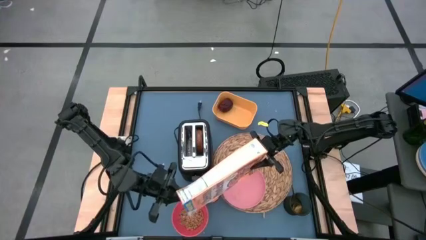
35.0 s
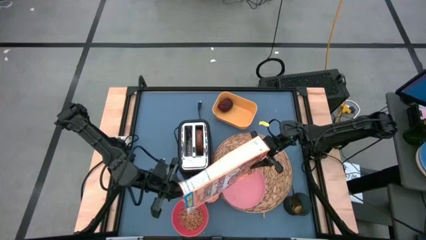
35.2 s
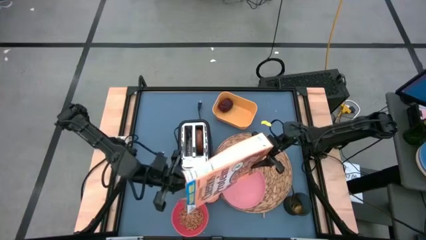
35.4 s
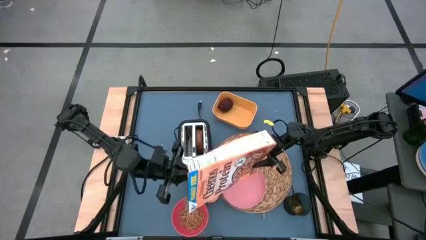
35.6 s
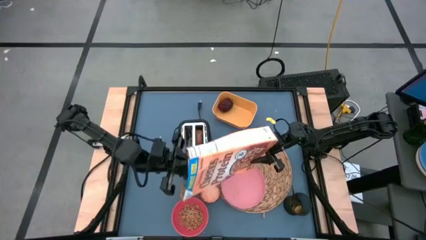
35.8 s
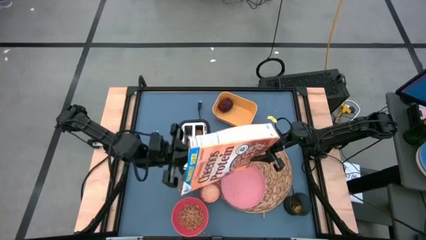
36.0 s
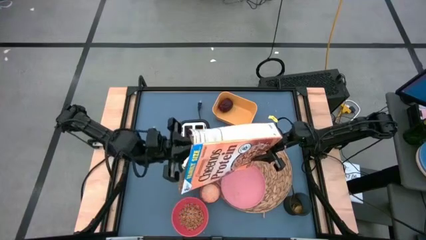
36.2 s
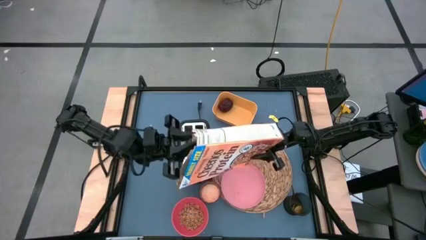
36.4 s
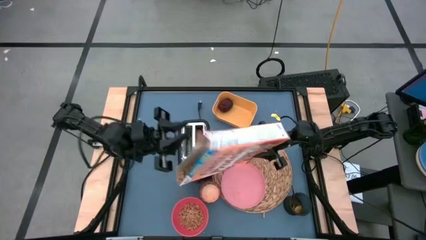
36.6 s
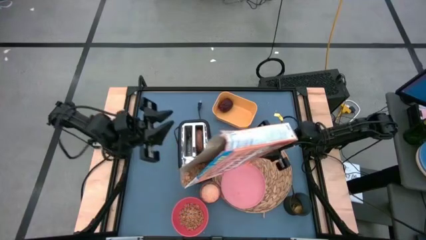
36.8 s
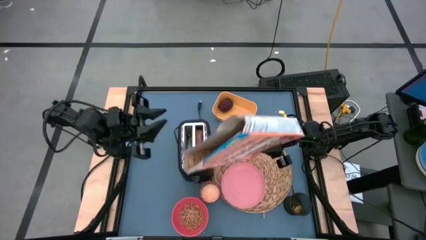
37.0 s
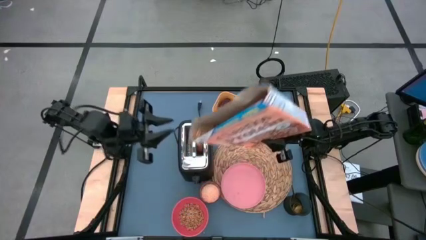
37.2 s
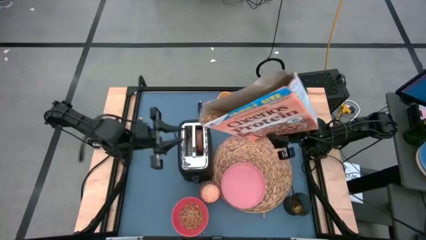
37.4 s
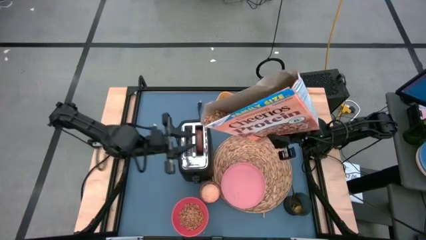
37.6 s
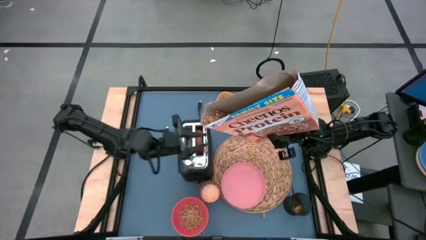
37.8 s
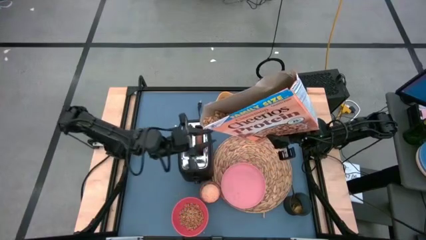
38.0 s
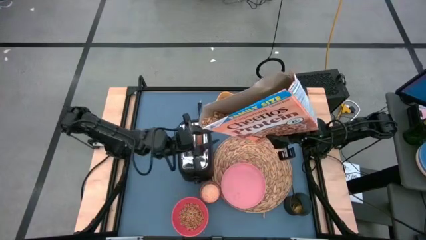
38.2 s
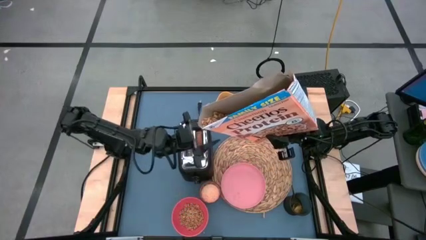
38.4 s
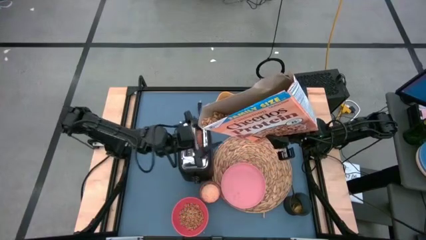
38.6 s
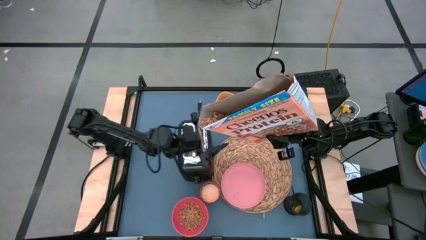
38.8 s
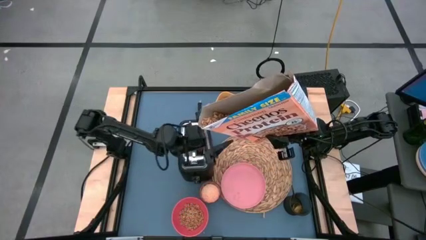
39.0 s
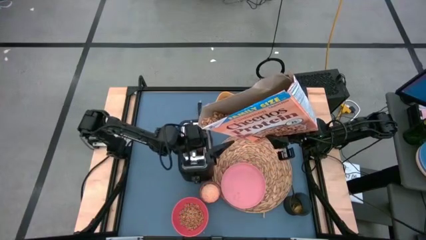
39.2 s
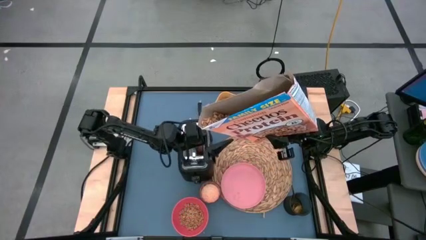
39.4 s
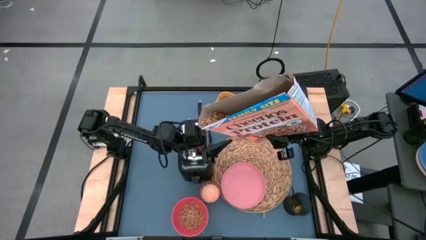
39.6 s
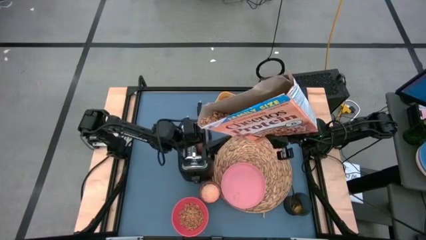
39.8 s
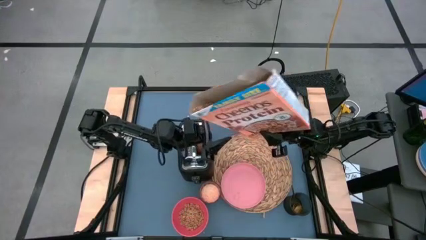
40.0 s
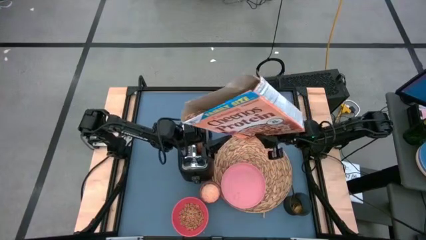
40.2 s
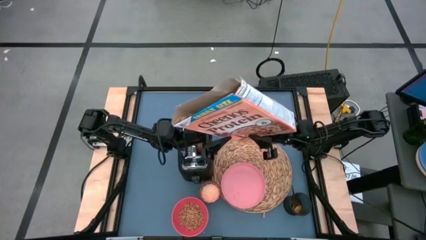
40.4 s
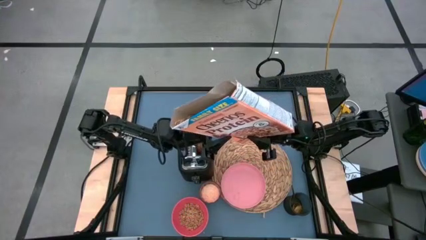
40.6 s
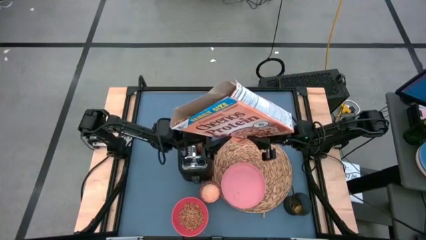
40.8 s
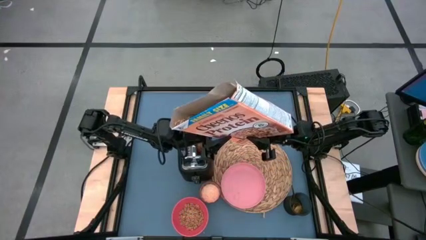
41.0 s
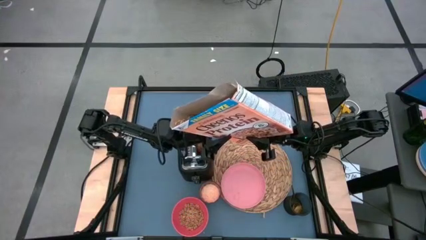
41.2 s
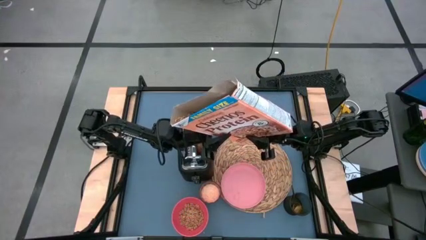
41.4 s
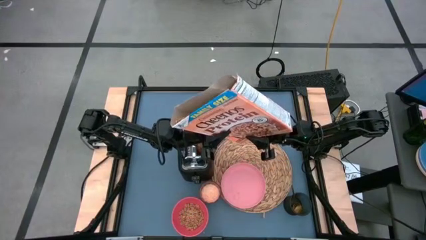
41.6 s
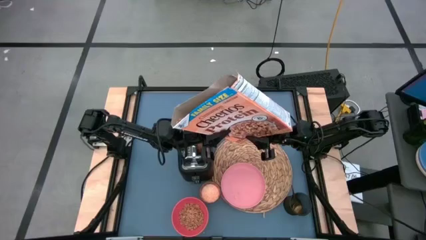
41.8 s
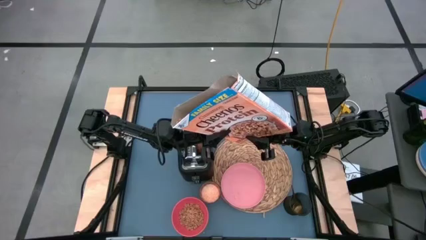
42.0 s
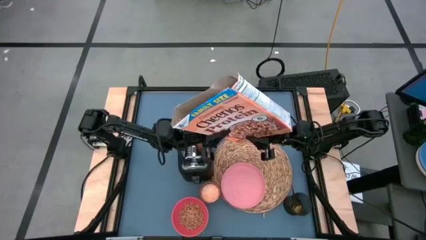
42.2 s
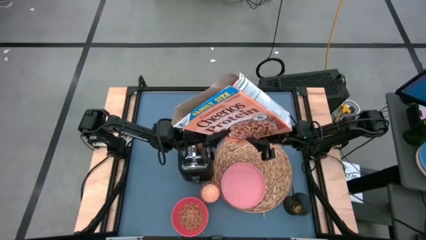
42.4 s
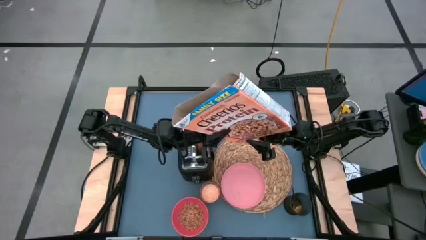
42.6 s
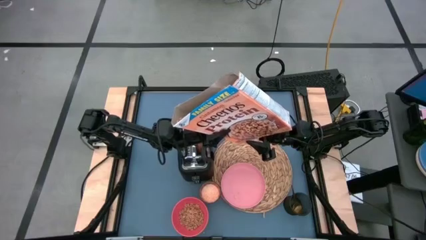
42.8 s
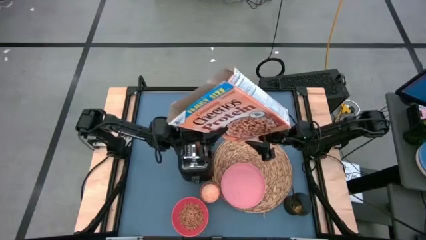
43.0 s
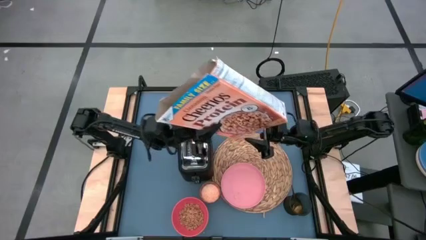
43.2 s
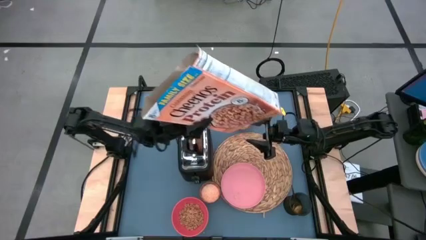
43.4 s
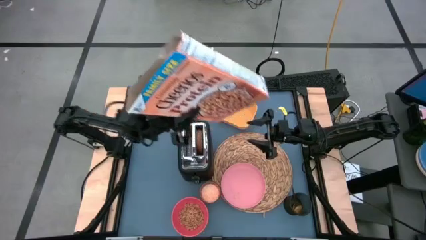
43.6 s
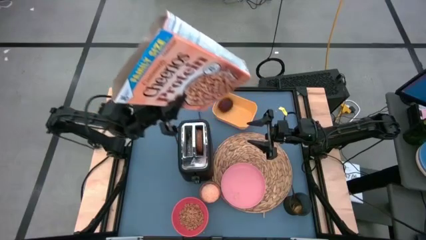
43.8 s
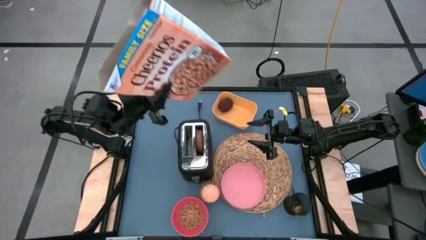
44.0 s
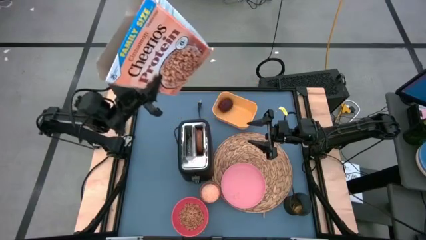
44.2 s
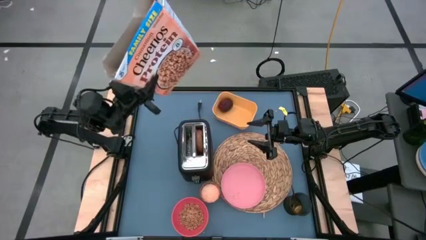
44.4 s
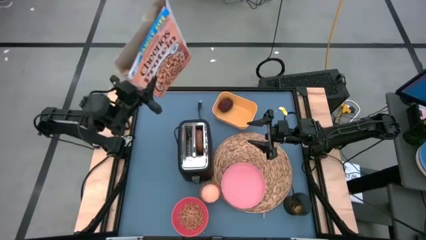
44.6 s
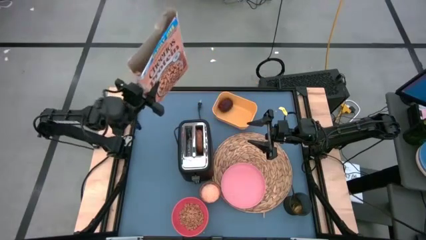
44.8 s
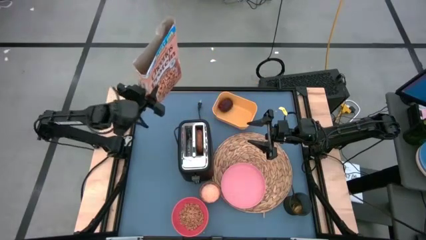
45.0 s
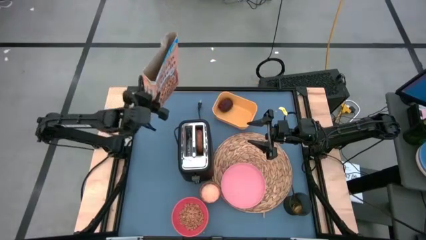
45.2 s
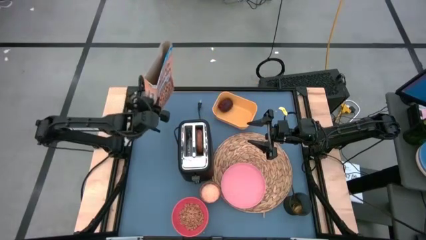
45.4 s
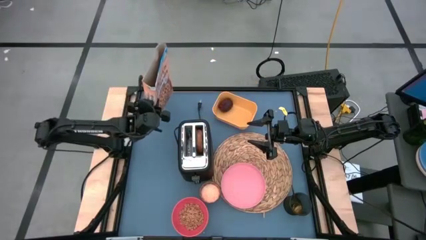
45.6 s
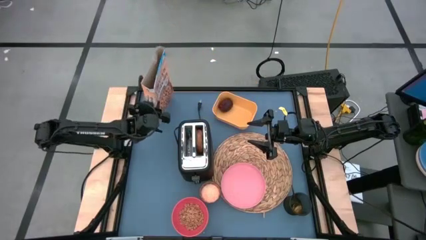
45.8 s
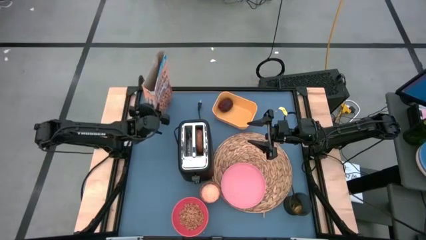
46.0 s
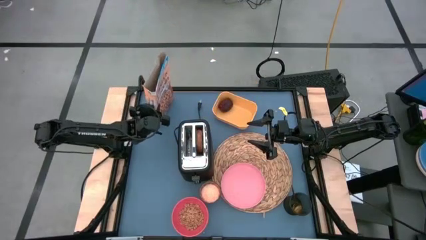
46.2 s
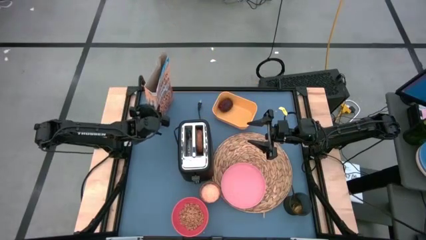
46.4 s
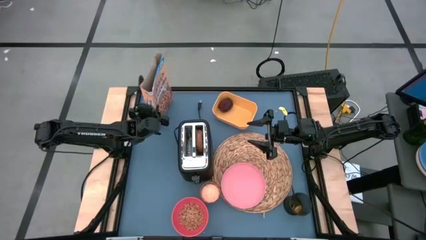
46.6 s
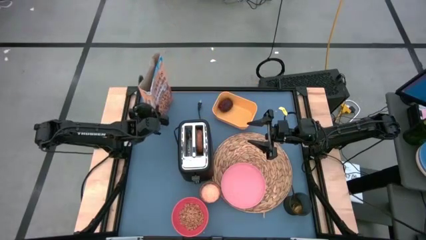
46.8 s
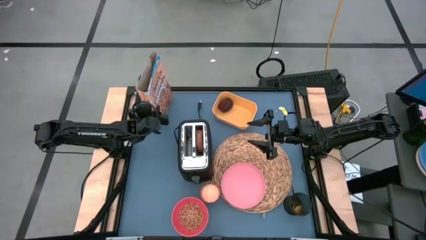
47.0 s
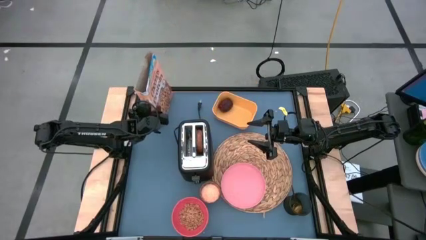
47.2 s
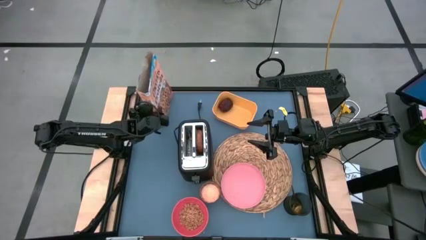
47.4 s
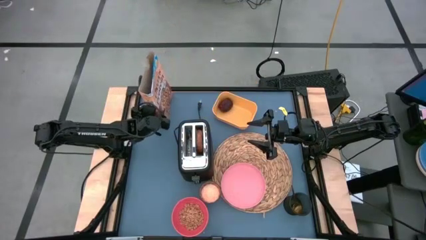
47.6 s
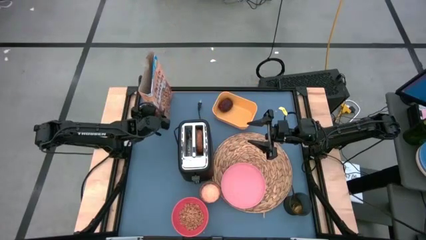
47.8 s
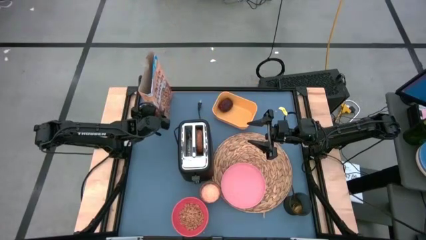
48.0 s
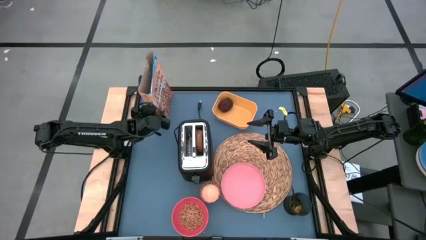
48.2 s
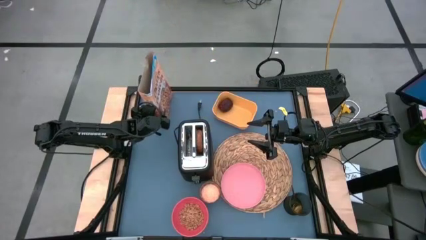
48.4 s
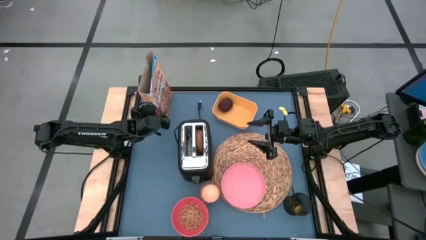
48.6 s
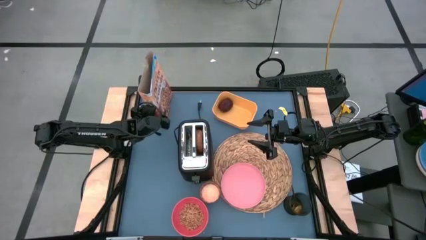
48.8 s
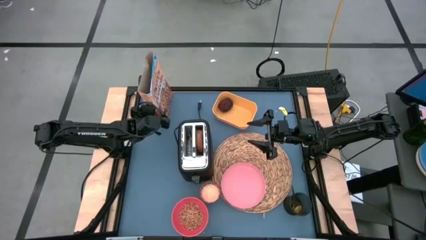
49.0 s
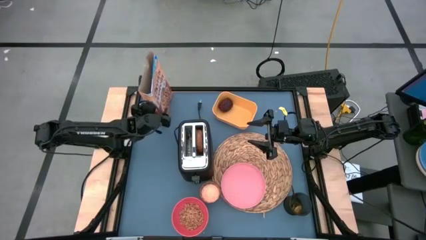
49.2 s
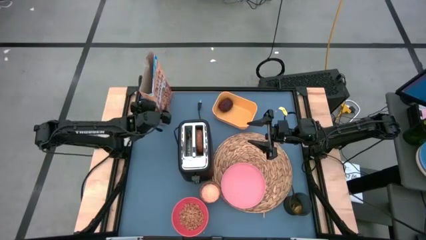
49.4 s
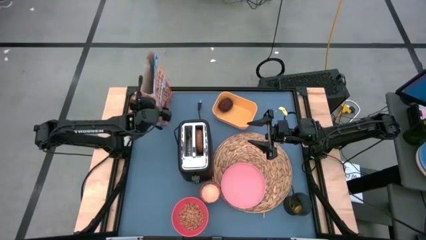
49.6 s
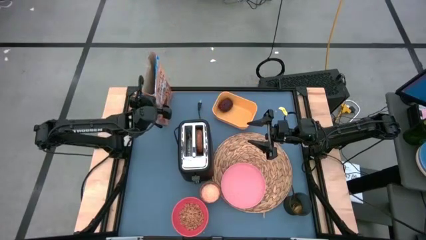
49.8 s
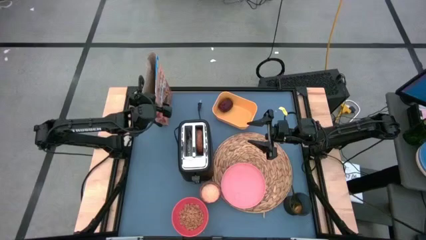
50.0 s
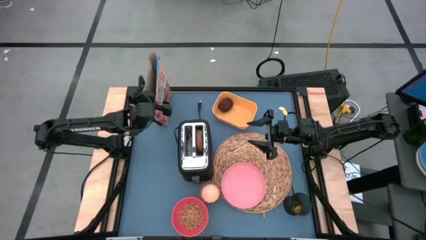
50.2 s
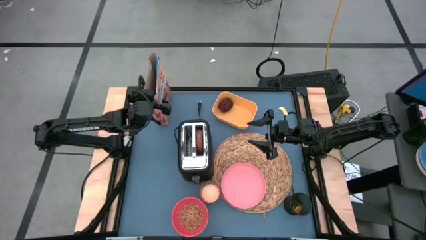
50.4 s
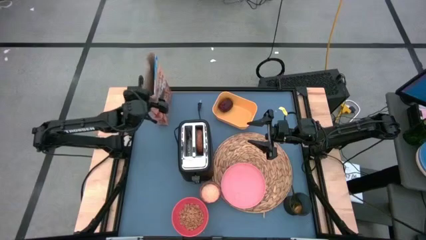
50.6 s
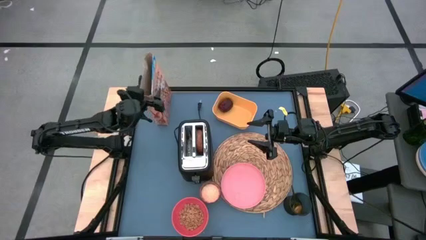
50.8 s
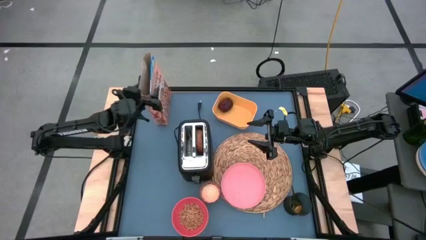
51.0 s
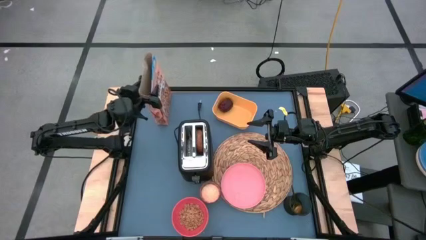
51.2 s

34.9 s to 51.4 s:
Task: Arrange a breakfast setting
Pour the cereal into the orange bowl
